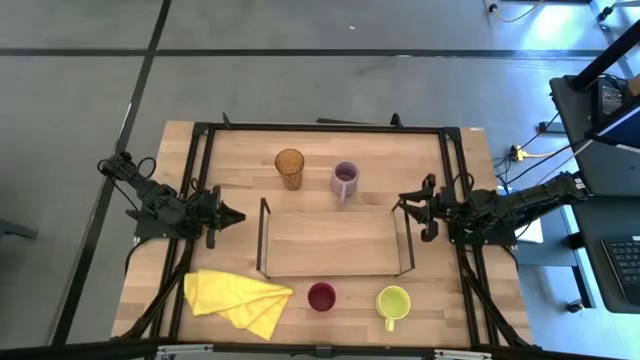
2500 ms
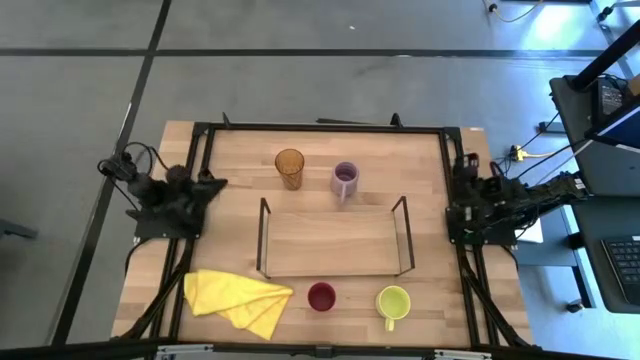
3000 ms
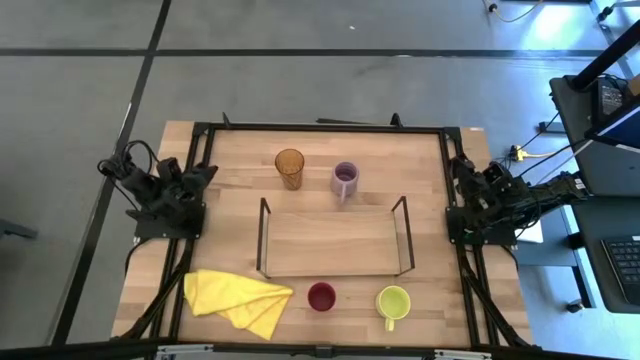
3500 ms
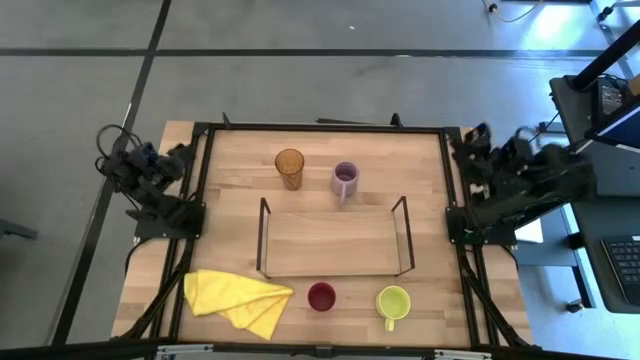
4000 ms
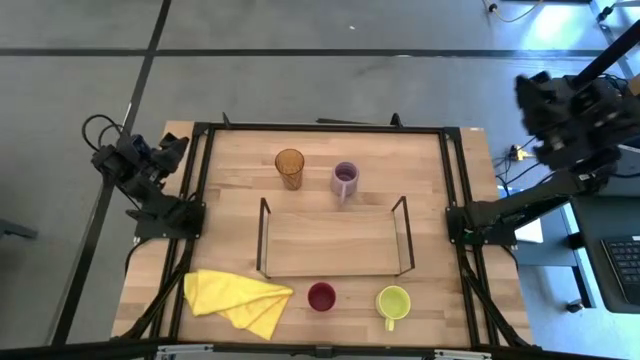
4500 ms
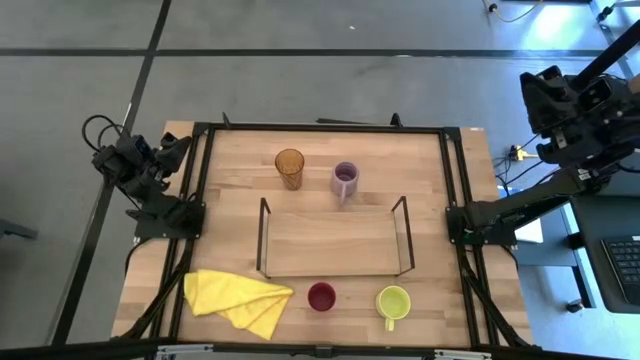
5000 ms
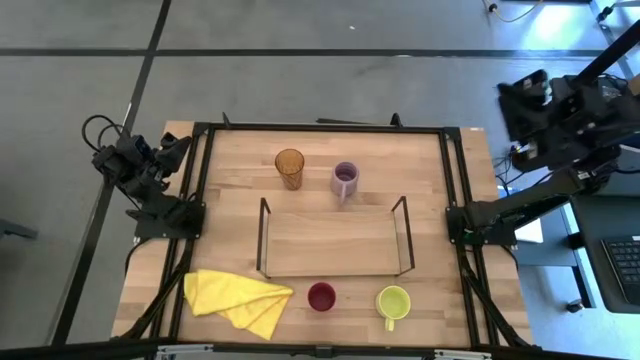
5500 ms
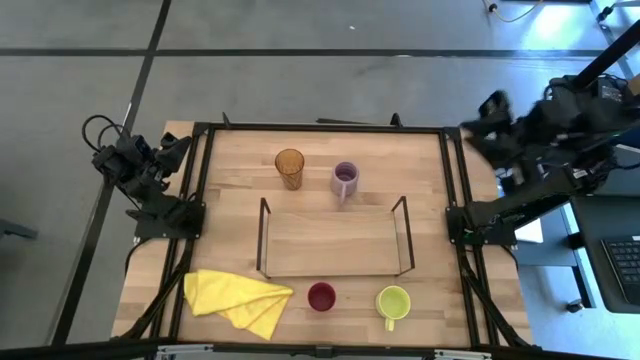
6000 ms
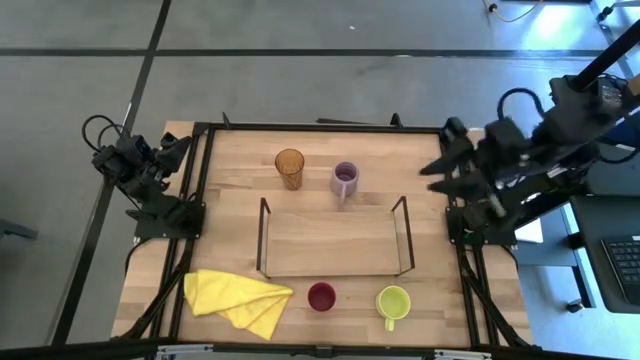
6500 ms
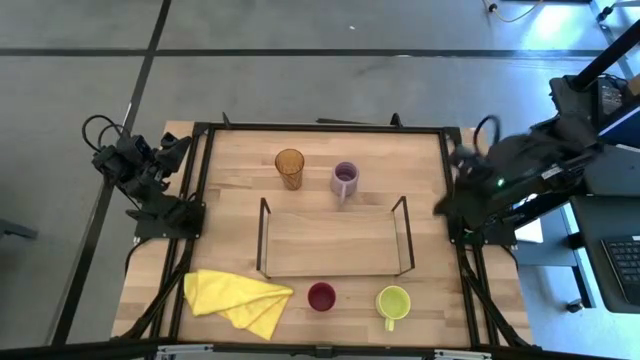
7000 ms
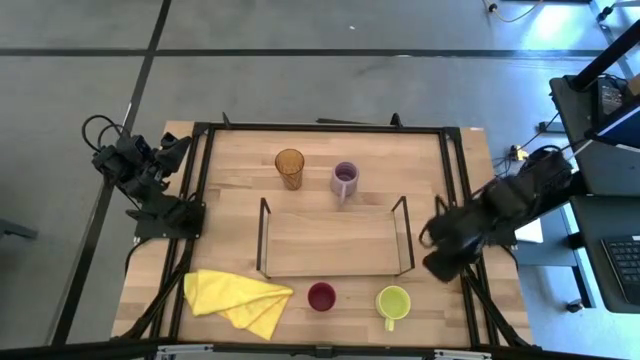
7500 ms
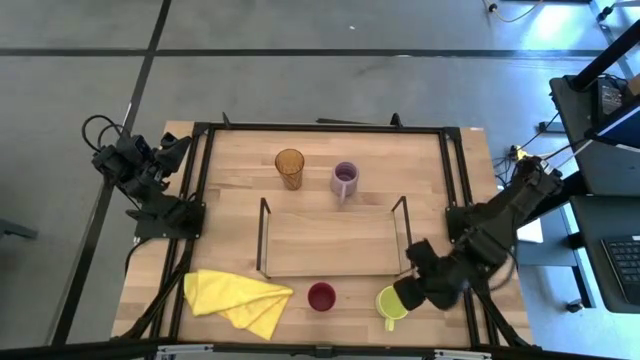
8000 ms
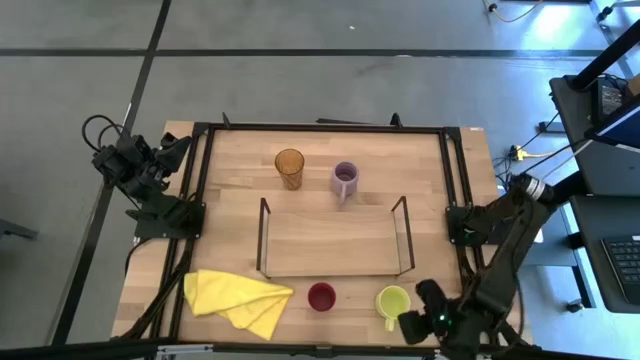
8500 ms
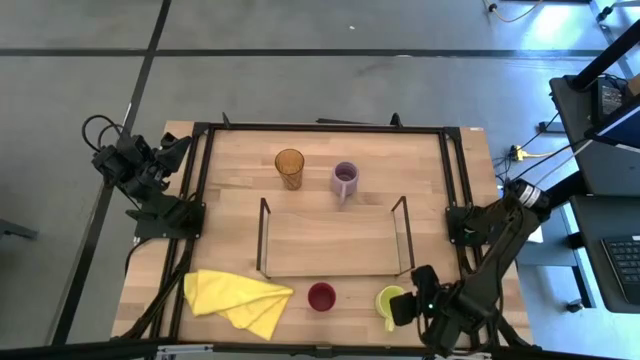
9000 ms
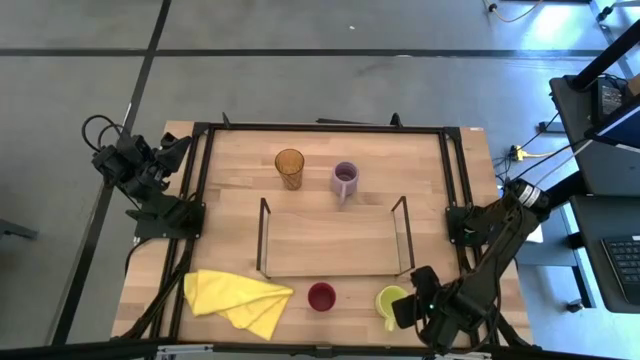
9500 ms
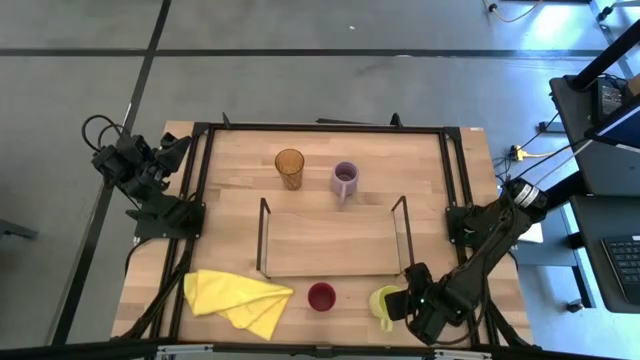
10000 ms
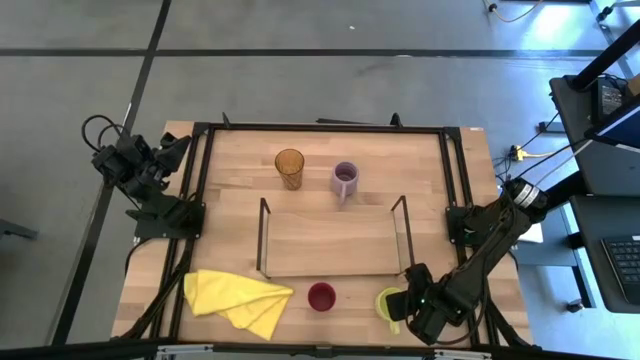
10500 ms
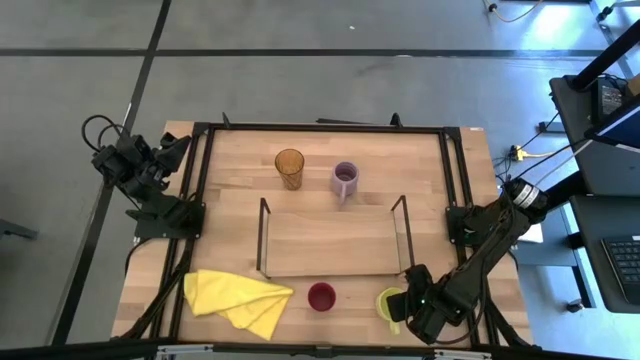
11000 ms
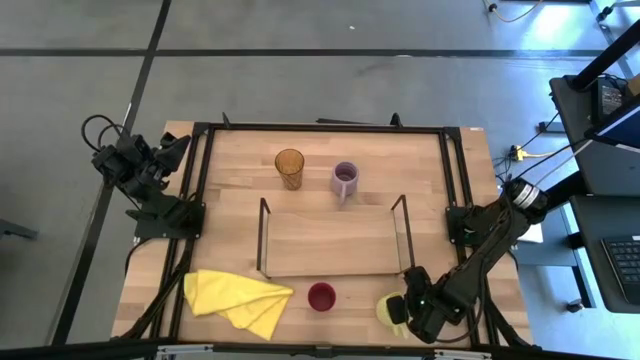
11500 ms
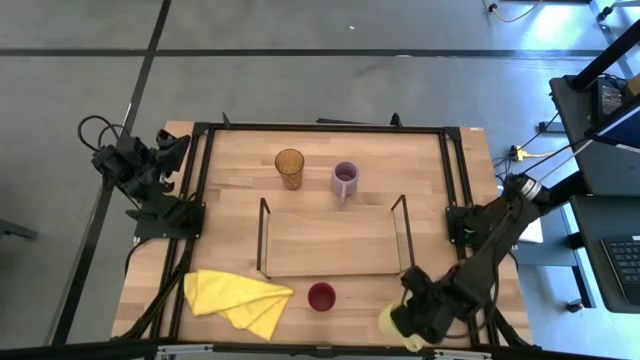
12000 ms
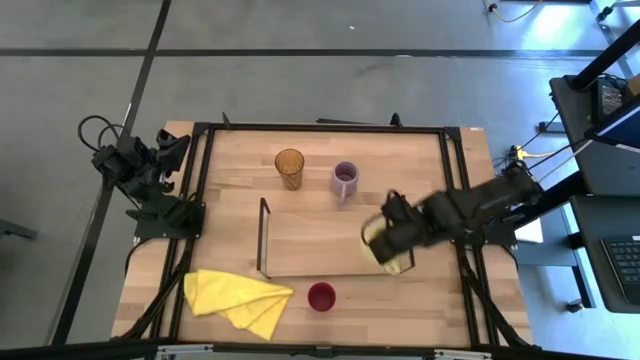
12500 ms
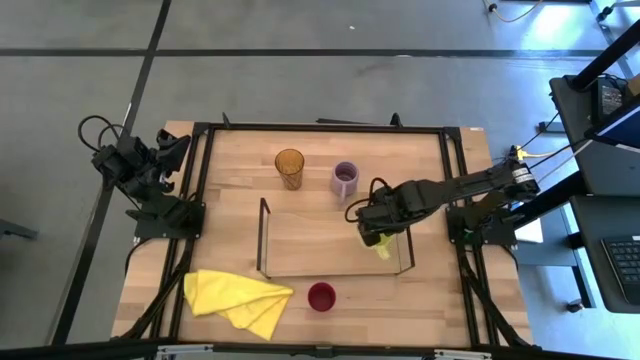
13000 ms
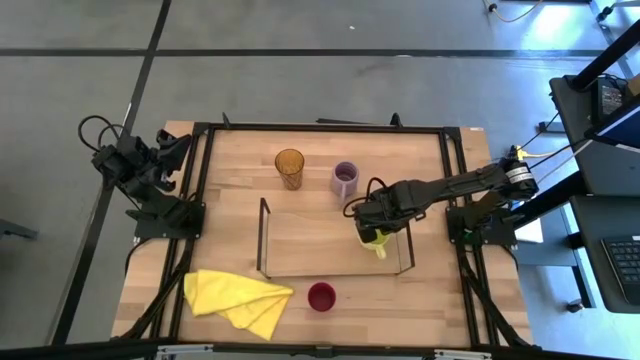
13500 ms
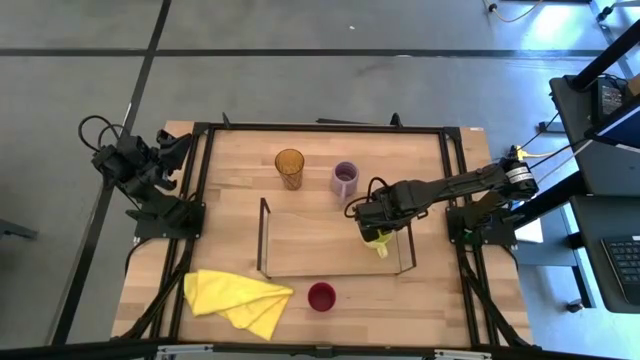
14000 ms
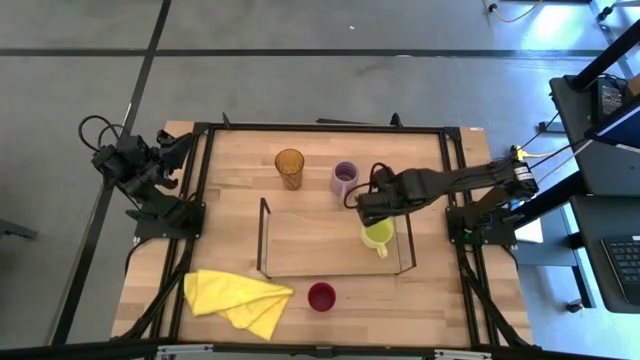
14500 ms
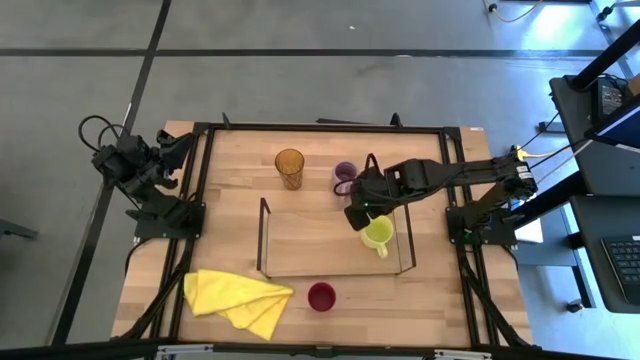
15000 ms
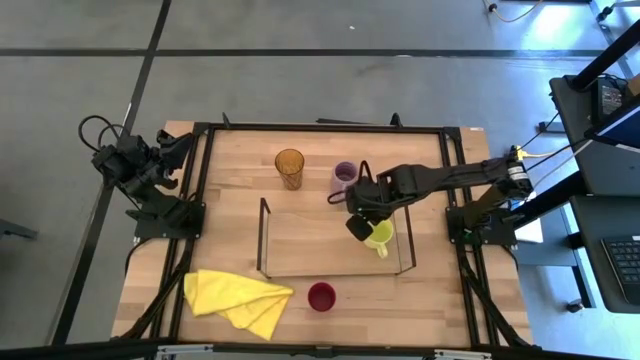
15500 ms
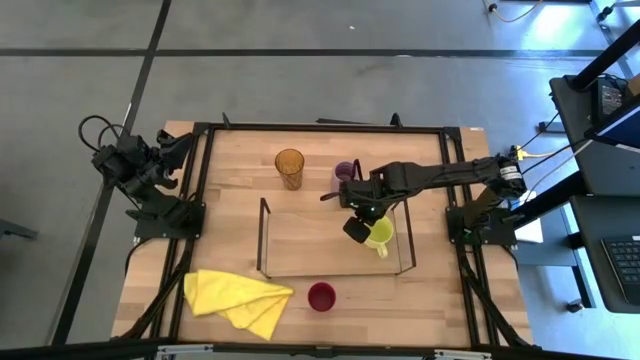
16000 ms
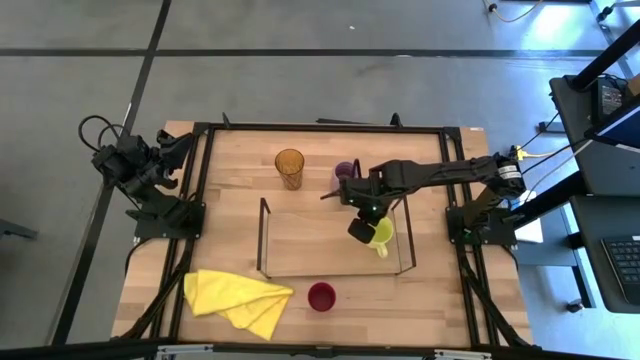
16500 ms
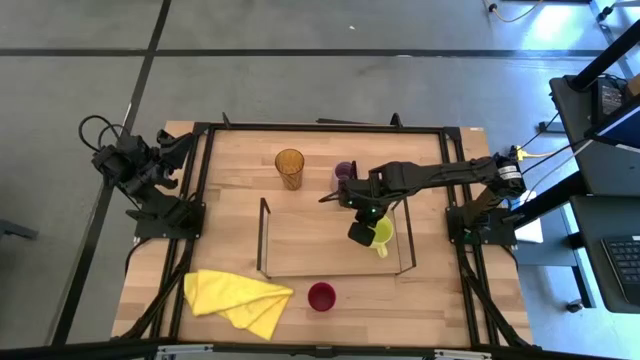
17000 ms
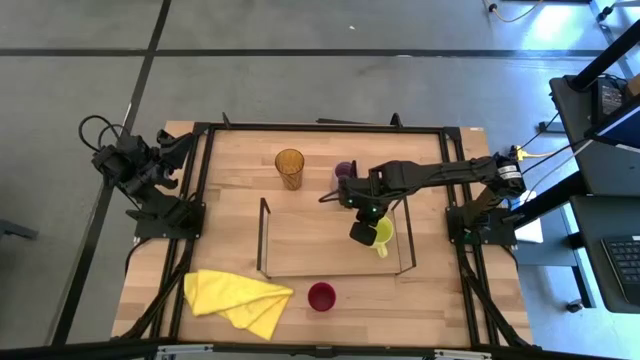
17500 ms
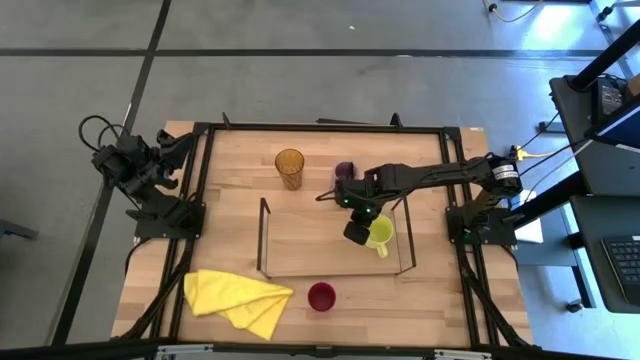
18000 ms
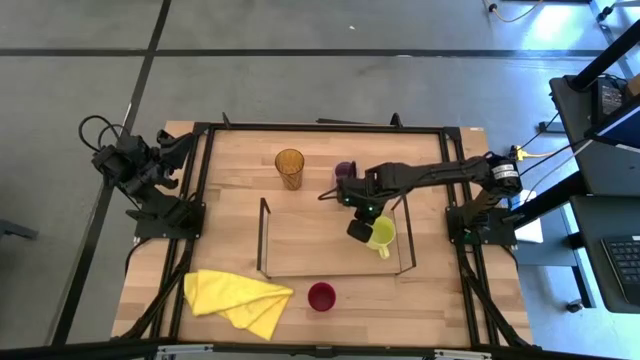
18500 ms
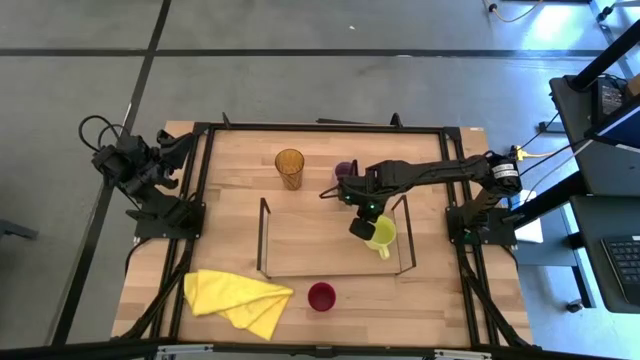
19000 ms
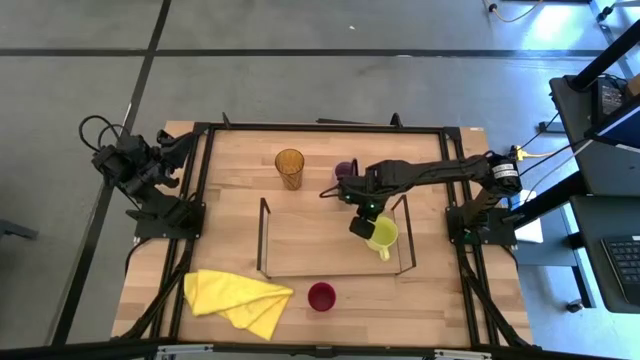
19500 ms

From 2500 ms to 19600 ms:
Task: Stack small to large cups/mugs on shelf
Put the yellow mug on the shelf

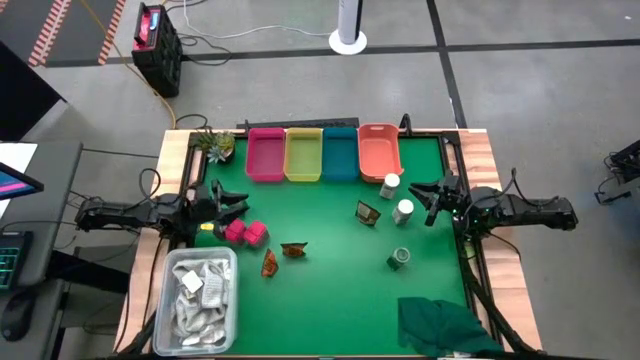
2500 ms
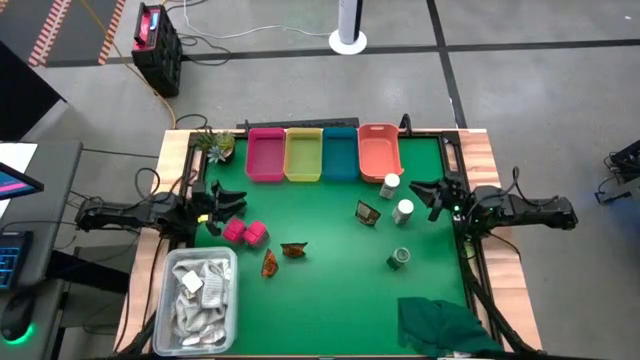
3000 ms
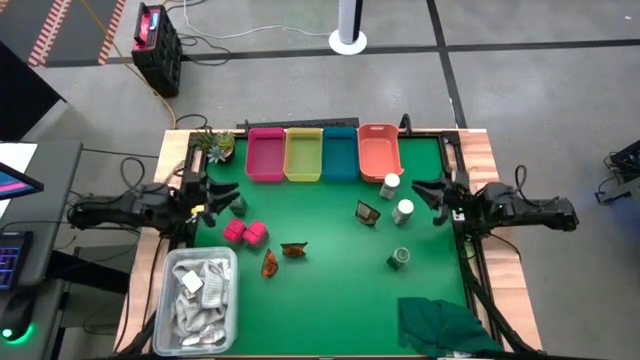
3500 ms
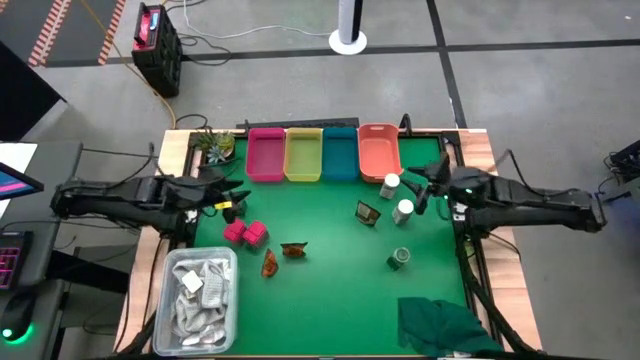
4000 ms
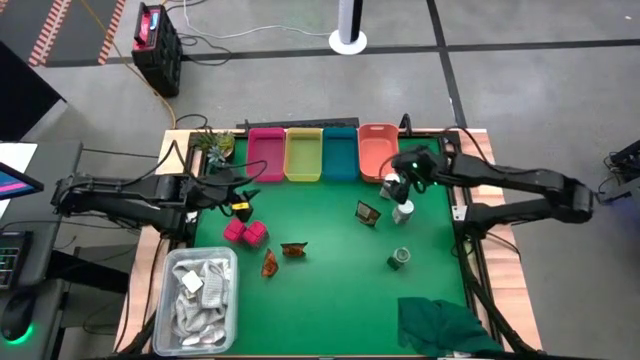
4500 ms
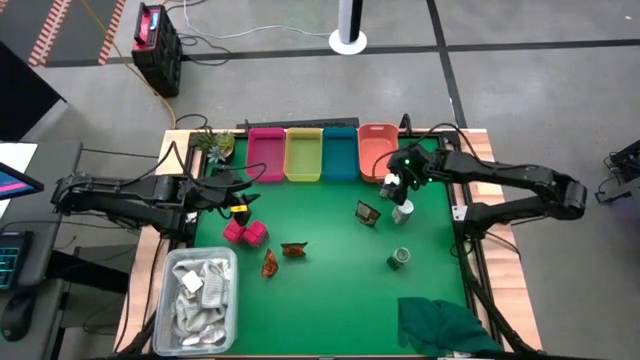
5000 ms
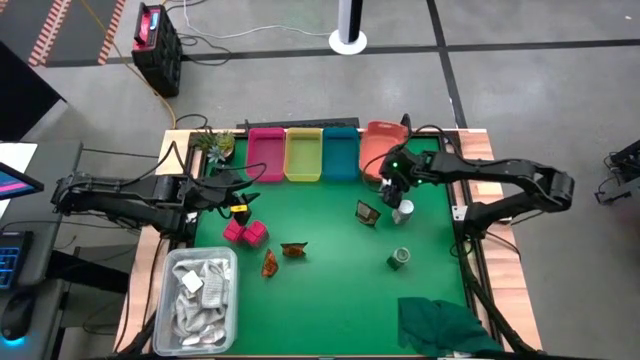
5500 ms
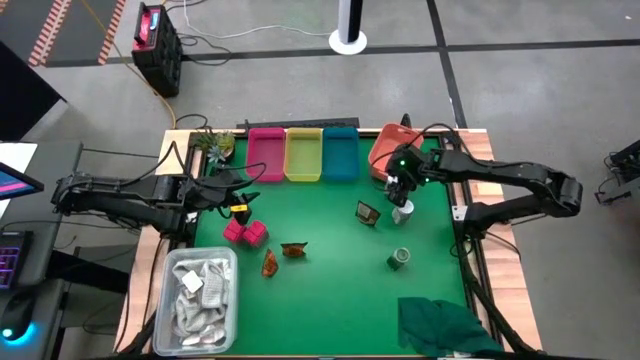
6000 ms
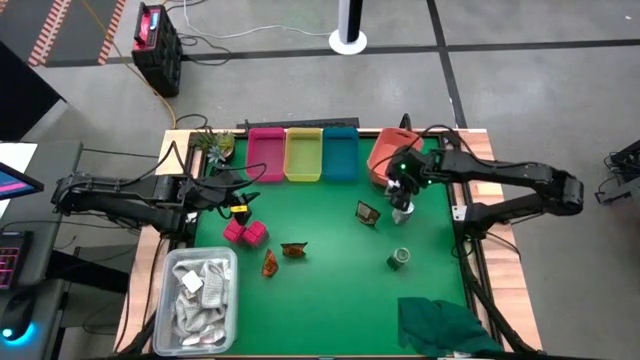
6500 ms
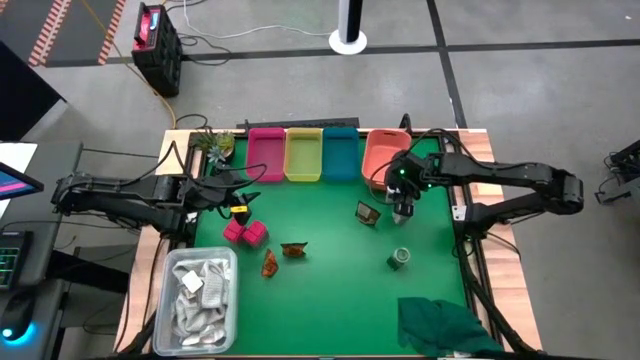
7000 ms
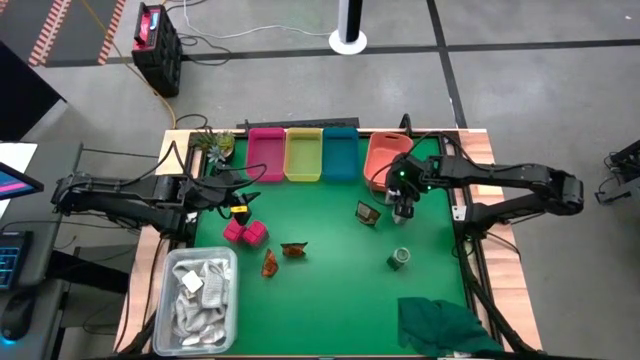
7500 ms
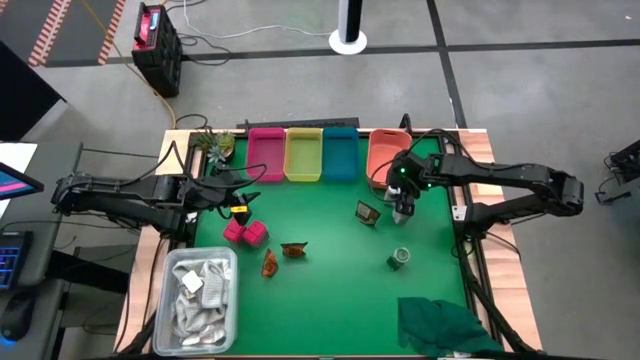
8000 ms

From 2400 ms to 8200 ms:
Task: Sort spices by type
Put the white lid seasoning bottle into the orange bin
